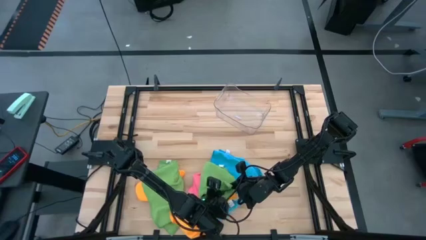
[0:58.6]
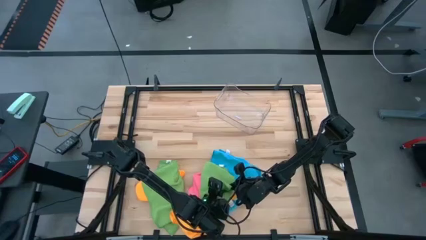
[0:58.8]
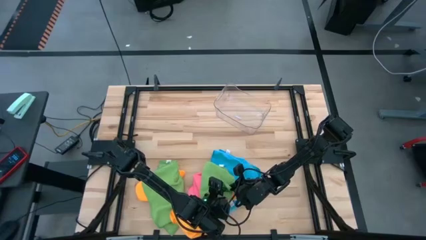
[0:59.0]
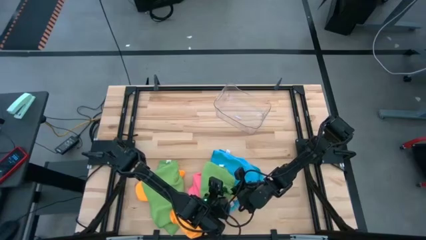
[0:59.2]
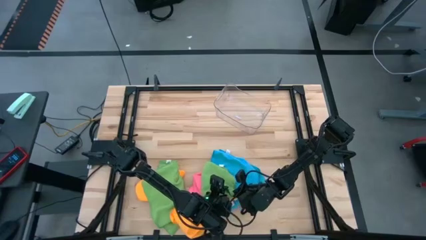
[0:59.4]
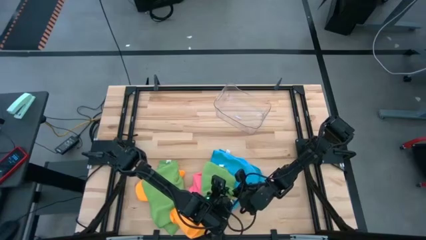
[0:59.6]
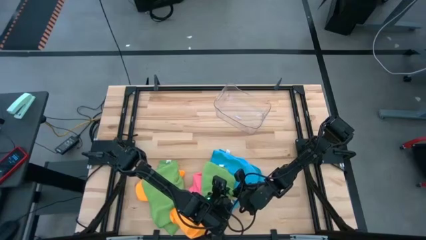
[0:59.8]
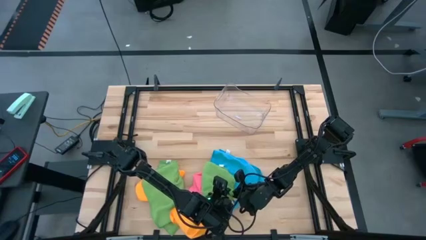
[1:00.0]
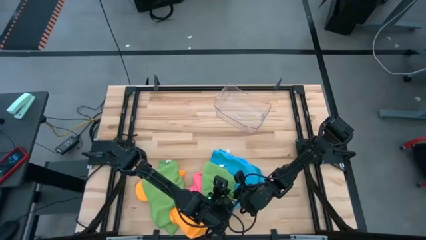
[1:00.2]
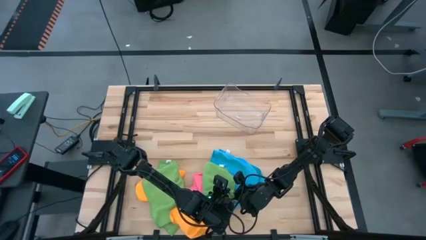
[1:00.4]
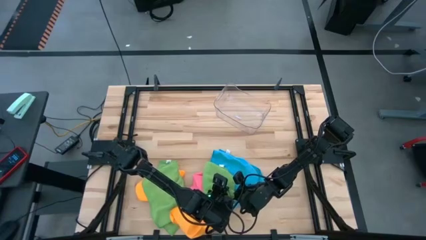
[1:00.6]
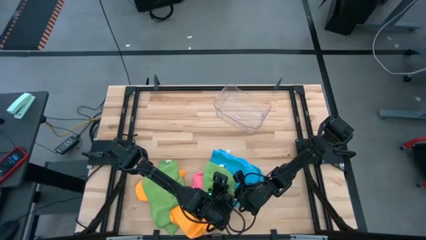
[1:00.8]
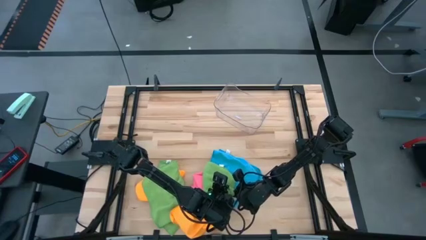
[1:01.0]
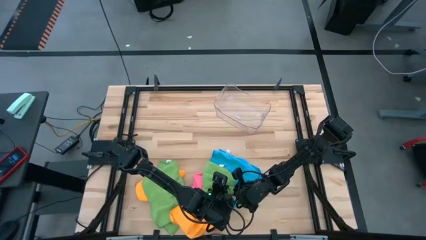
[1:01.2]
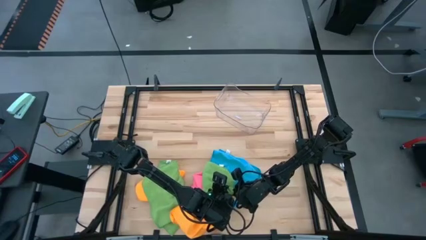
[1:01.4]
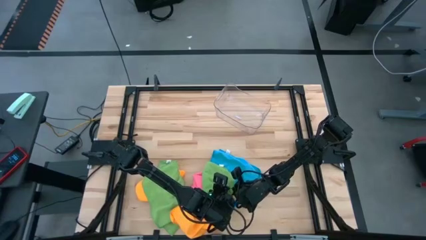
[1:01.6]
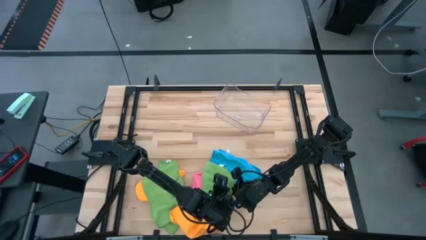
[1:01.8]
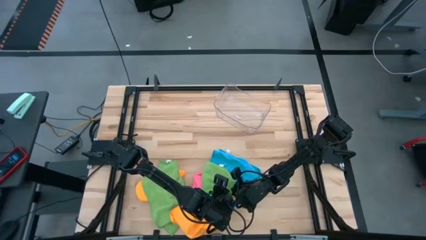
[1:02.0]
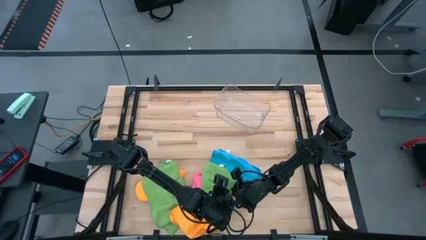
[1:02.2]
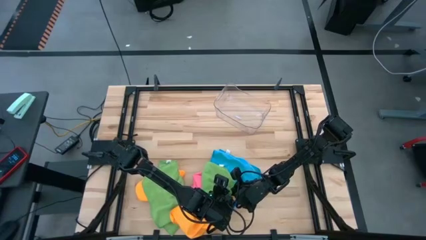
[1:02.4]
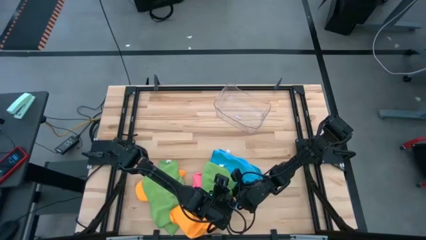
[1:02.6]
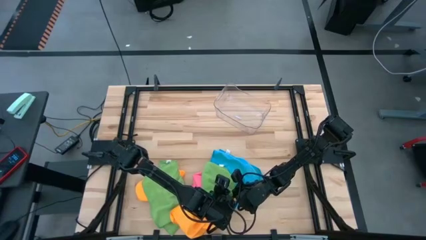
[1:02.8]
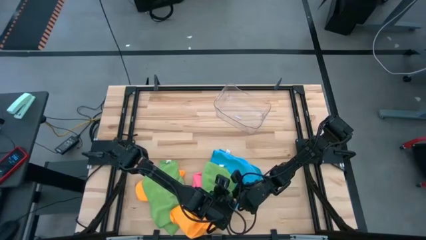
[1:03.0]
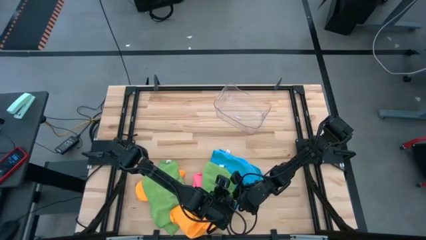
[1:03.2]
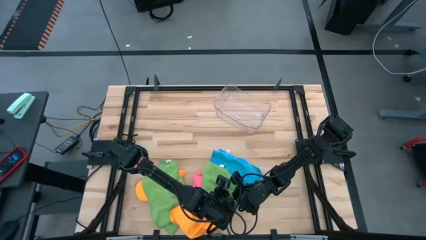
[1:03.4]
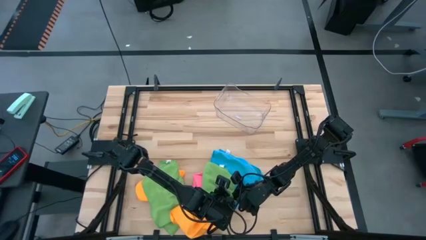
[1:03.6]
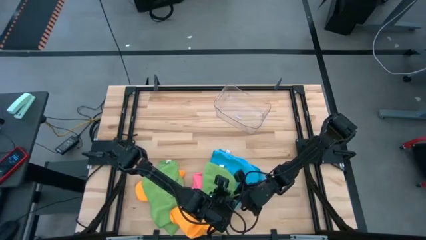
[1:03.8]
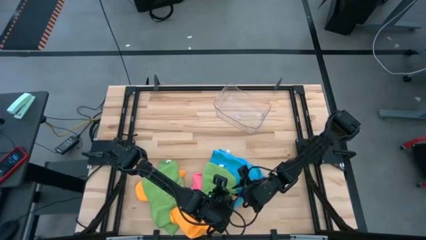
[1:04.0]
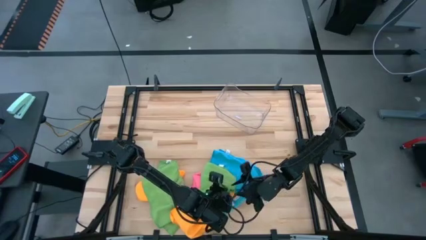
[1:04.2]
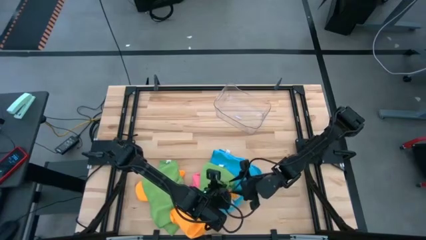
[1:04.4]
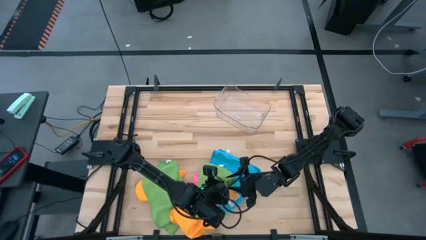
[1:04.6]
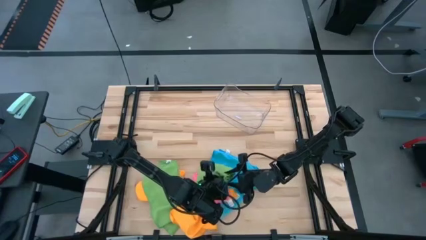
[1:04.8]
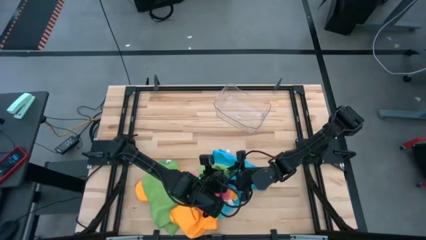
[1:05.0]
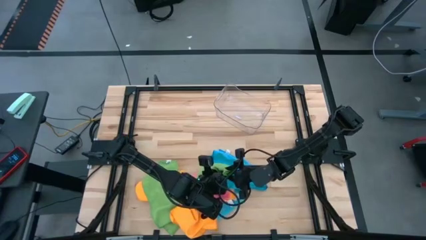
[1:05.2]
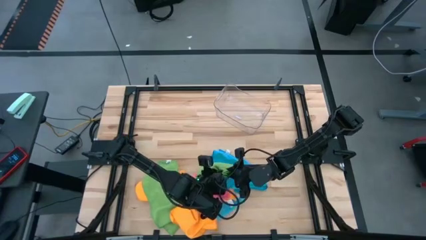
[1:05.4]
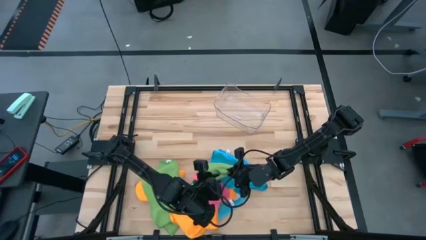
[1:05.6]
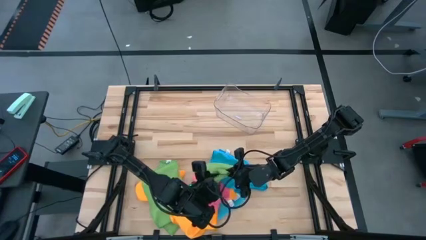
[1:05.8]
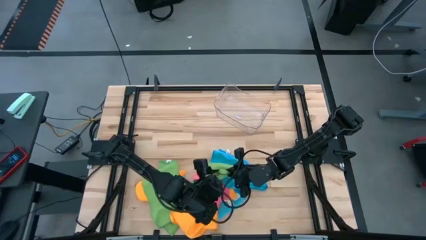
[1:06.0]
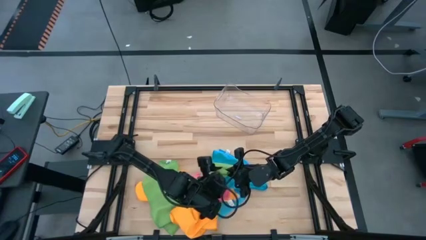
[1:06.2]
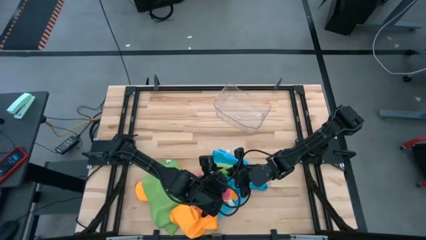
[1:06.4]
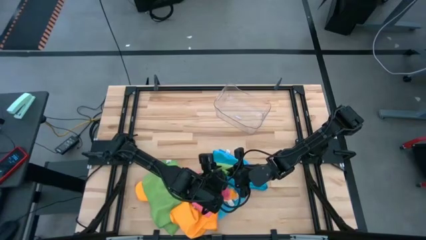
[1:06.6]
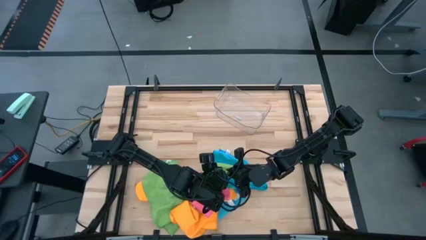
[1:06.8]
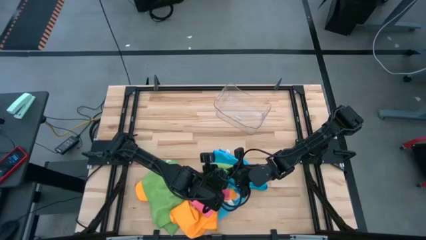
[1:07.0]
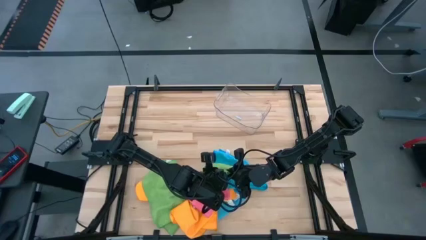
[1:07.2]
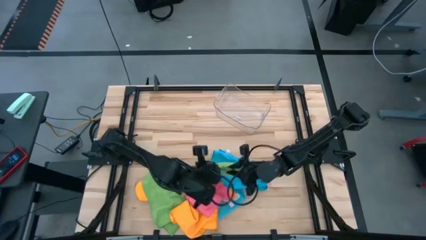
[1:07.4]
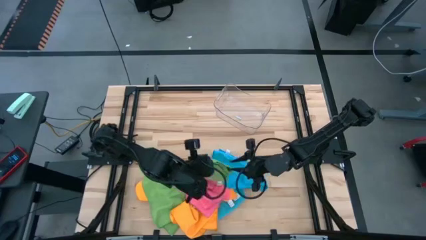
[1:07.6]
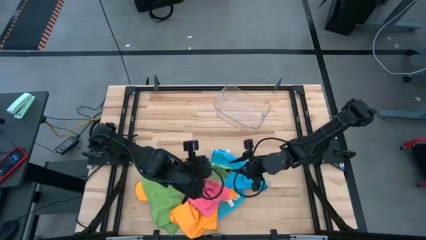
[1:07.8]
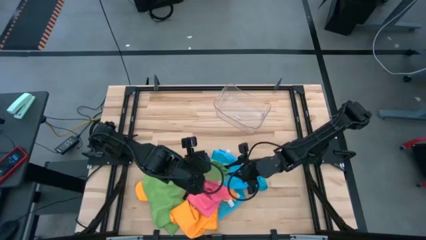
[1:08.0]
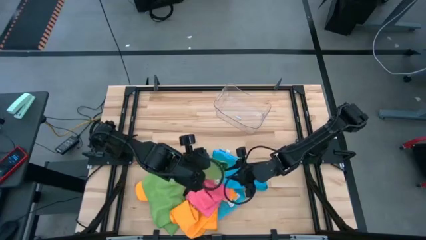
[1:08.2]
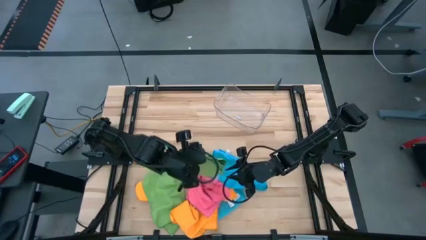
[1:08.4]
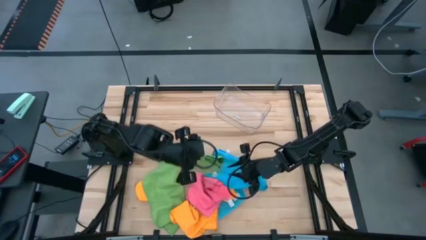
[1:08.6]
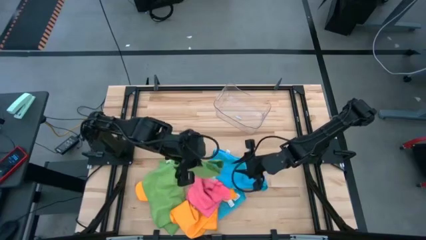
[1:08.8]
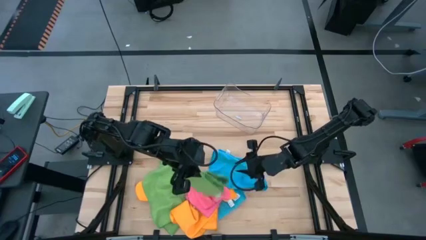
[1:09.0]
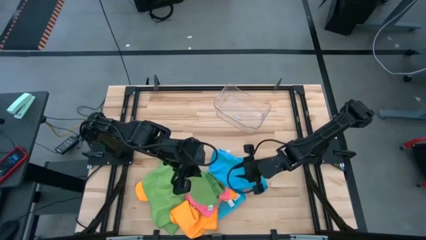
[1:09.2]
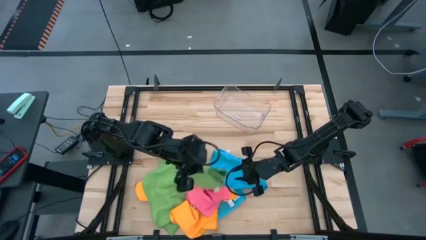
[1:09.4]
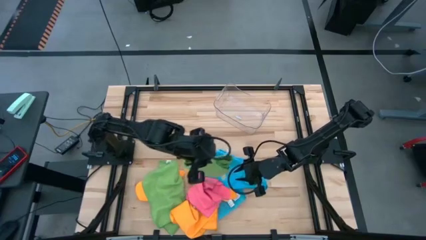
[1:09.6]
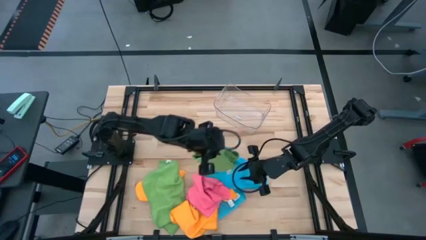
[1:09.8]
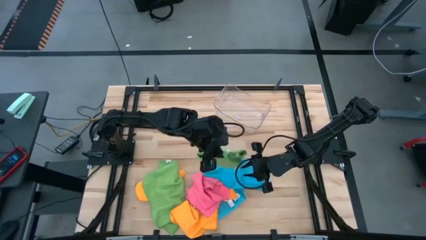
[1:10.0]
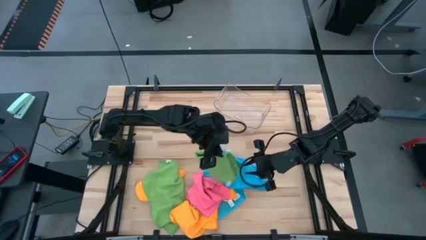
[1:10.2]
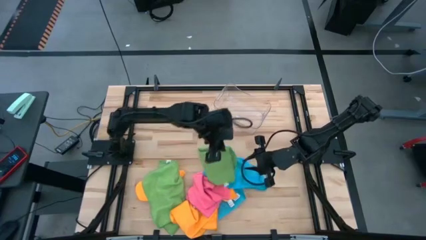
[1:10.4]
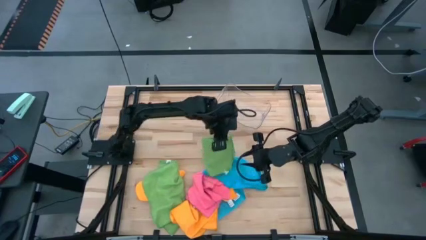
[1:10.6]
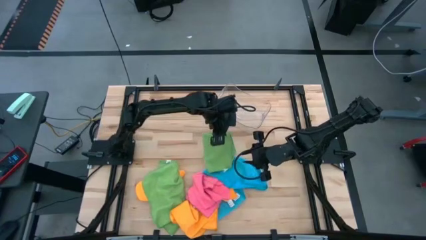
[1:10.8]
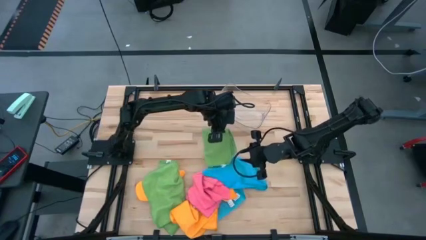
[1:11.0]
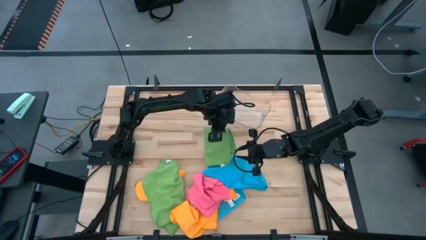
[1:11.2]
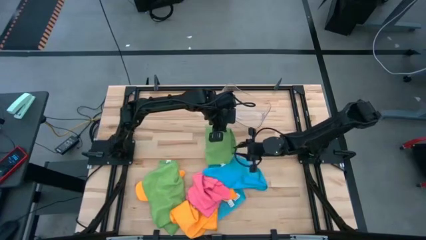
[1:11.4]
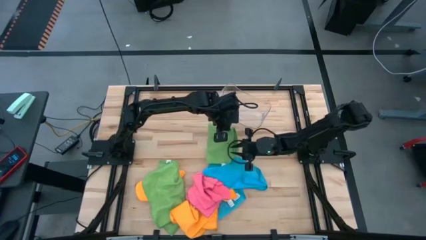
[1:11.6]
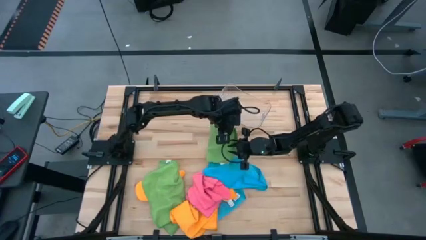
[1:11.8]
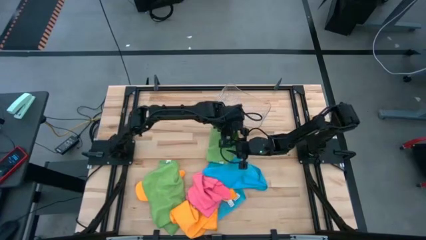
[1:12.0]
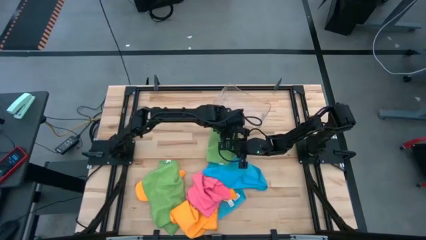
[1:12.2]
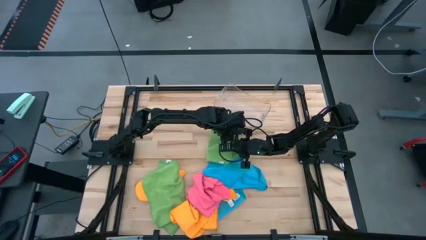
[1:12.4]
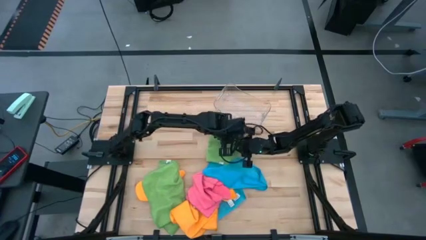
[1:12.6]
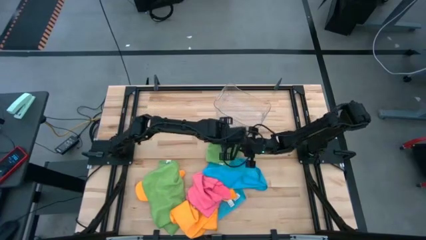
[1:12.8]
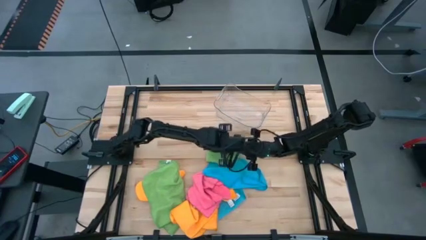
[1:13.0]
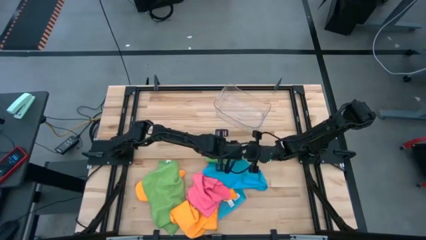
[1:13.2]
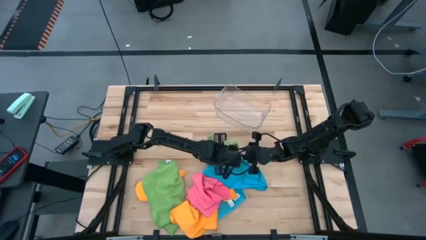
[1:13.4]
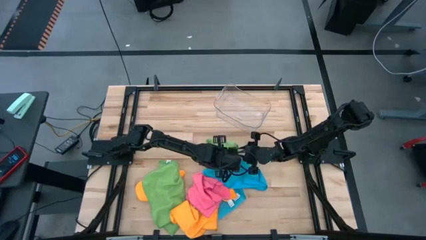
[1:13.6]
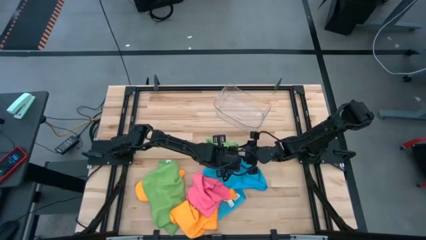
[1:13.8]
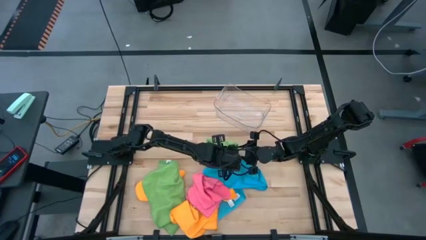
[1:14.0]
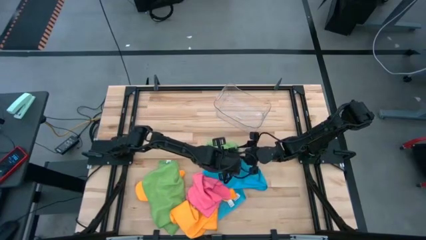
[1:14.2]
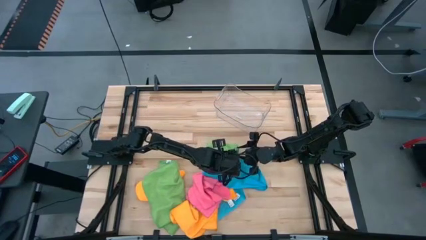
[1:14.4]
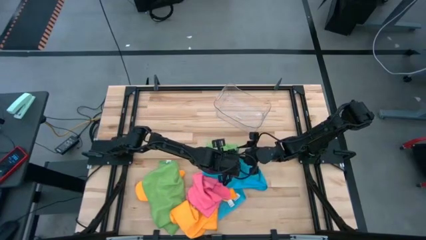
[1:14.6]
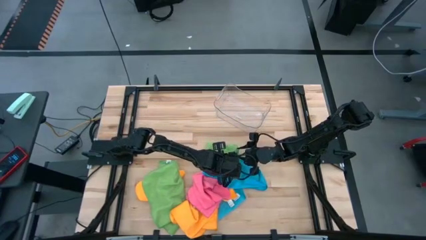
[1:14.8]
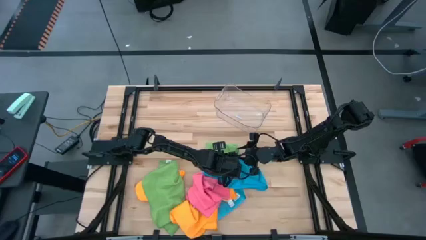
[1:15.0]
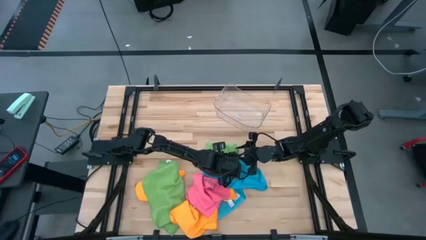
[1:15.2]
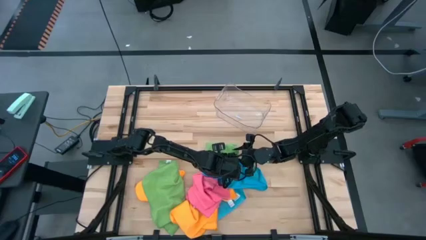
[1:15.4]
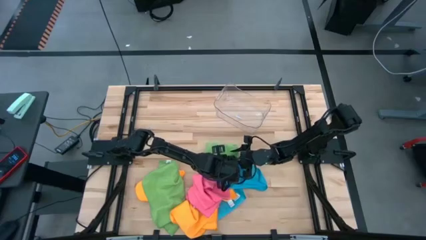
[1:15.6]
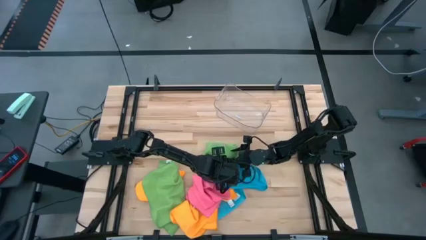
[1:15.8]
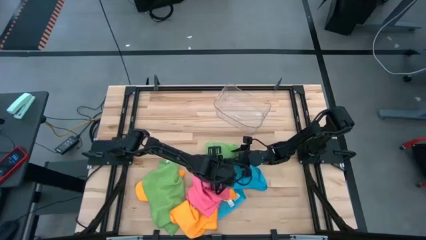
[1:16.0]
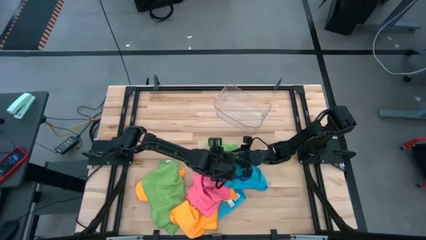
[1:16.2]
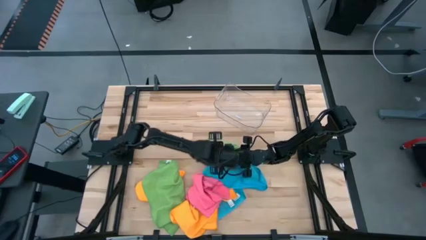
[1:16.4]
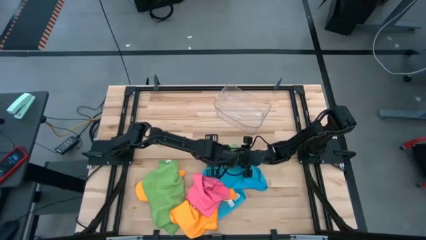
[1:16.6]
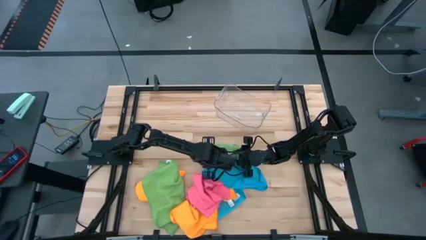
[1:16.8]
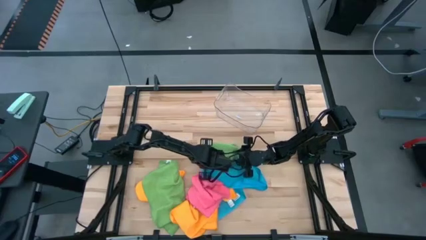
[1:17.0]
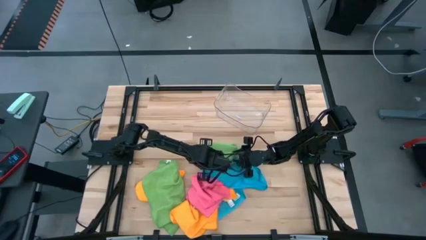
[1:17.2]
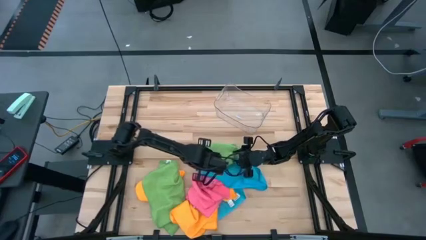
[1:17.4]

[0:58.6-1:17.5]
Task: Fold microfiber towels
Fold the top green towel
